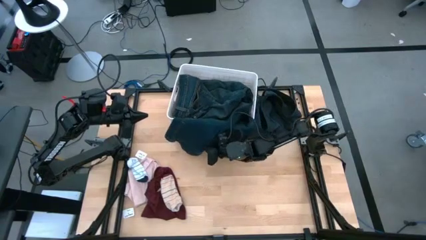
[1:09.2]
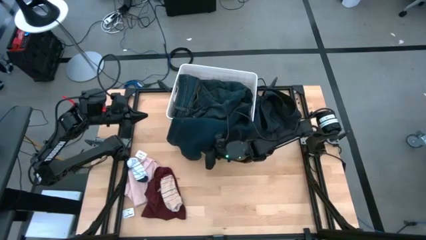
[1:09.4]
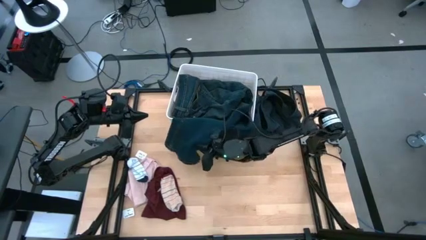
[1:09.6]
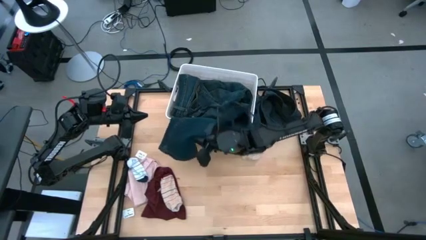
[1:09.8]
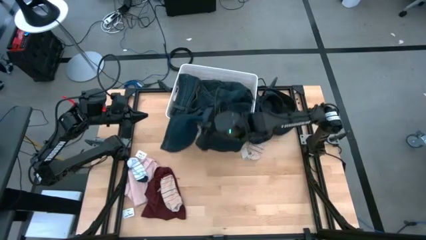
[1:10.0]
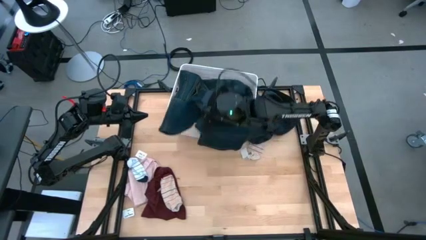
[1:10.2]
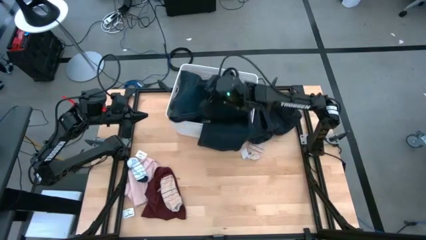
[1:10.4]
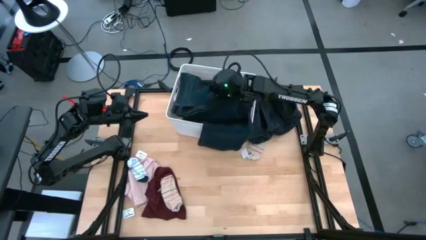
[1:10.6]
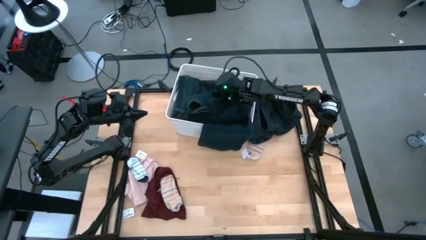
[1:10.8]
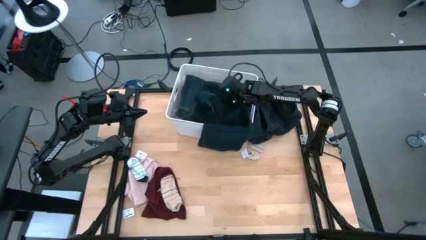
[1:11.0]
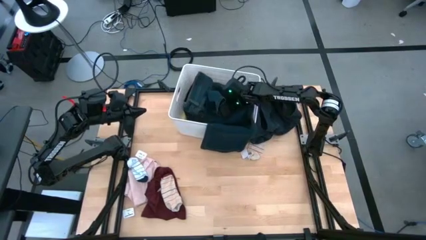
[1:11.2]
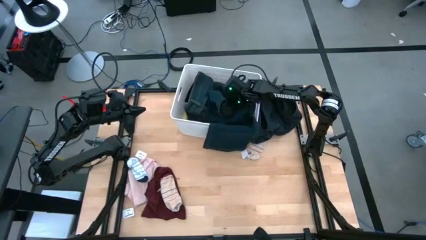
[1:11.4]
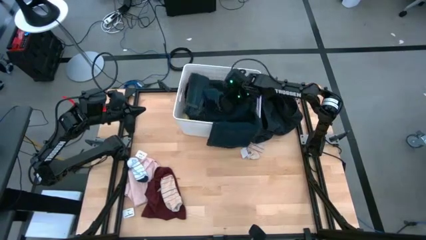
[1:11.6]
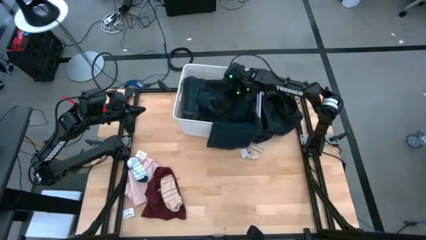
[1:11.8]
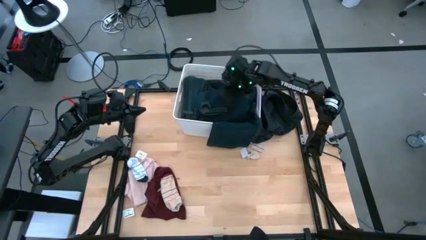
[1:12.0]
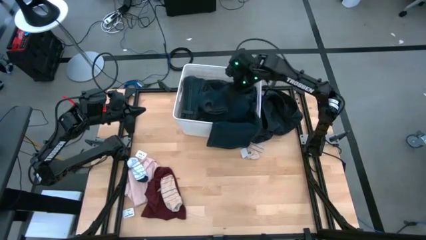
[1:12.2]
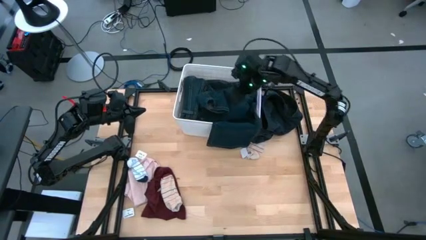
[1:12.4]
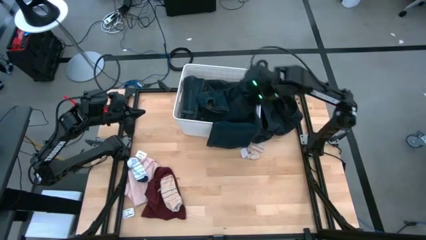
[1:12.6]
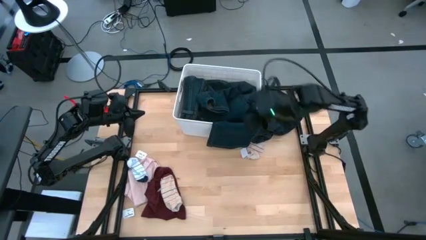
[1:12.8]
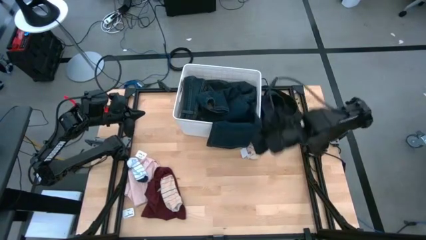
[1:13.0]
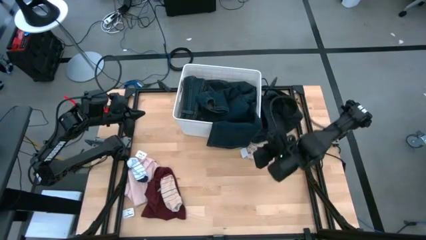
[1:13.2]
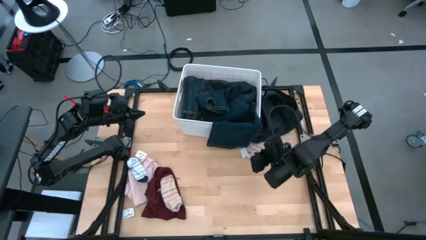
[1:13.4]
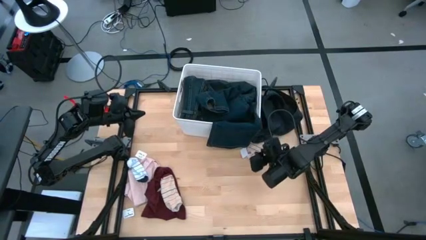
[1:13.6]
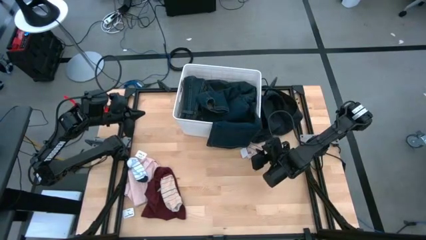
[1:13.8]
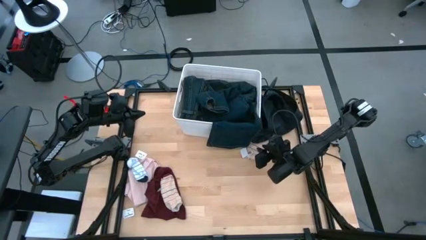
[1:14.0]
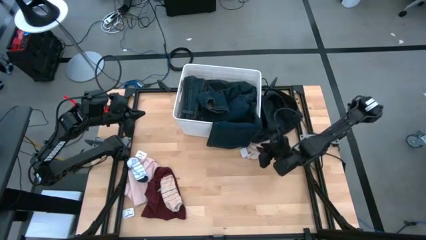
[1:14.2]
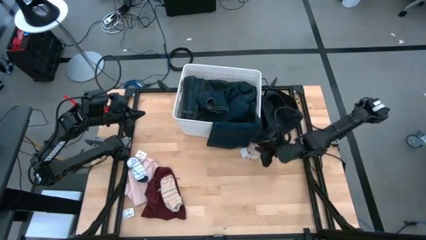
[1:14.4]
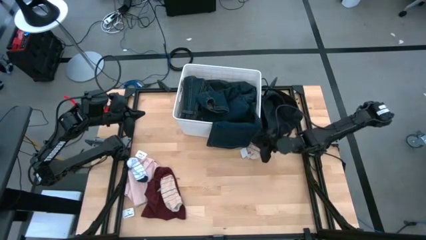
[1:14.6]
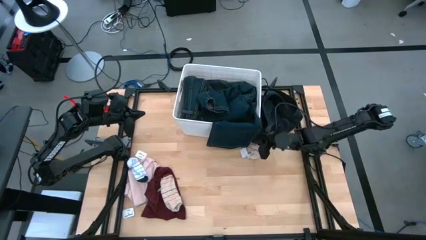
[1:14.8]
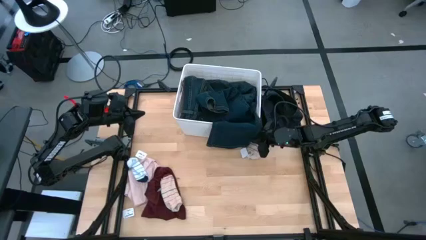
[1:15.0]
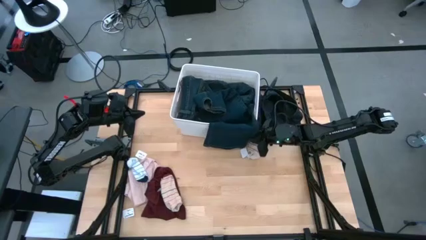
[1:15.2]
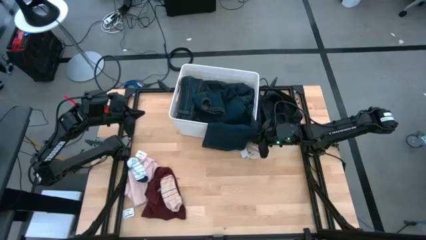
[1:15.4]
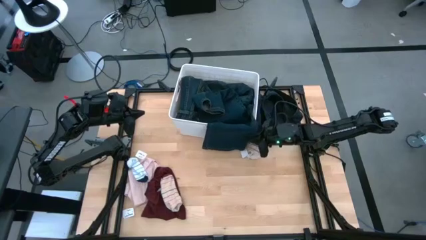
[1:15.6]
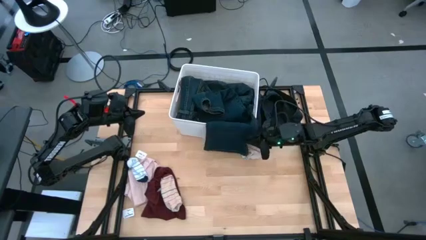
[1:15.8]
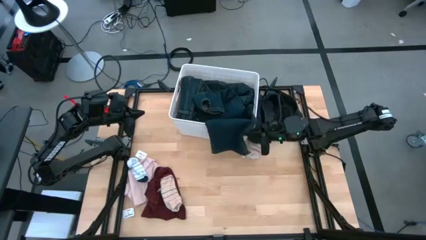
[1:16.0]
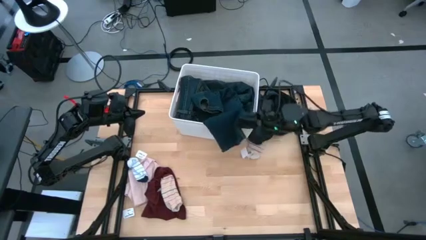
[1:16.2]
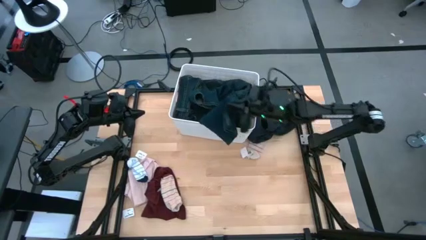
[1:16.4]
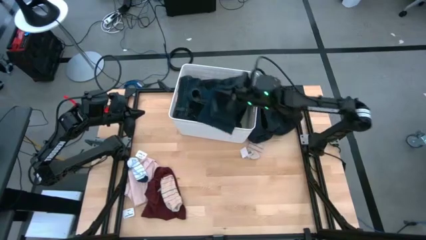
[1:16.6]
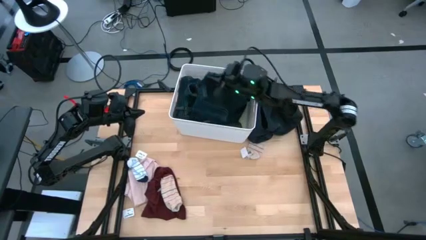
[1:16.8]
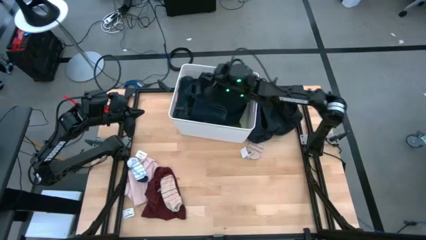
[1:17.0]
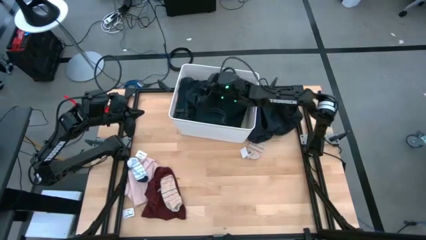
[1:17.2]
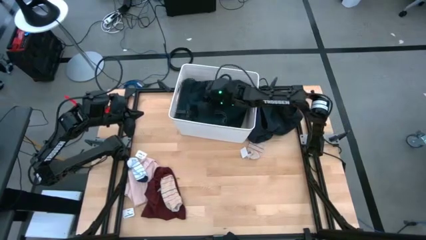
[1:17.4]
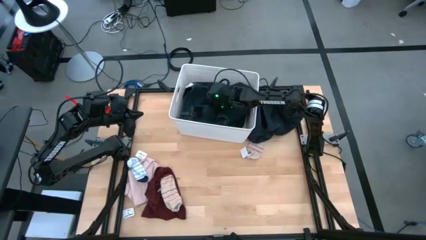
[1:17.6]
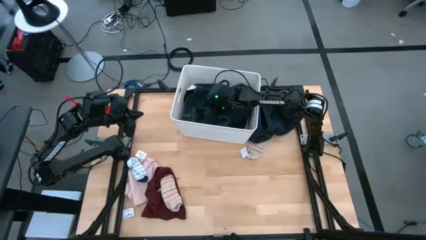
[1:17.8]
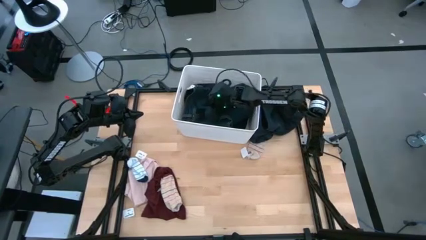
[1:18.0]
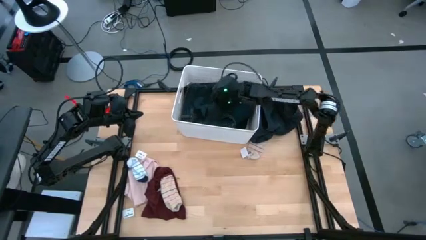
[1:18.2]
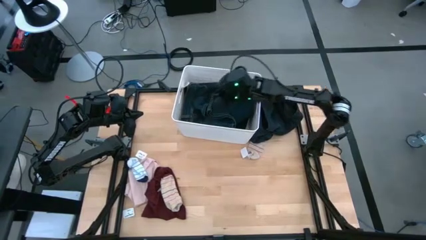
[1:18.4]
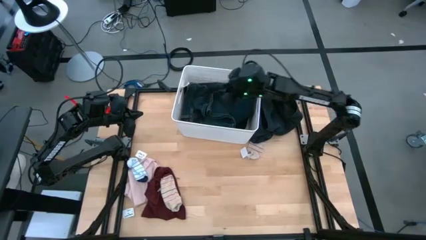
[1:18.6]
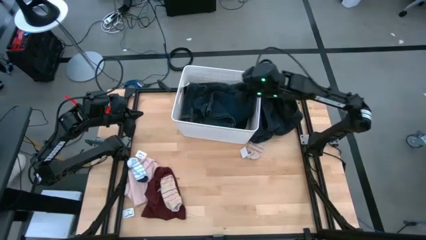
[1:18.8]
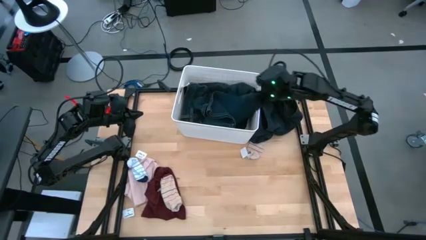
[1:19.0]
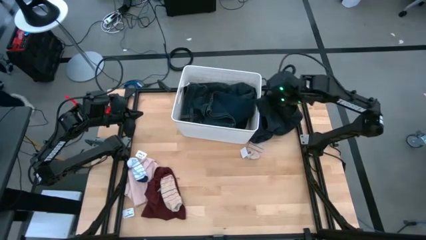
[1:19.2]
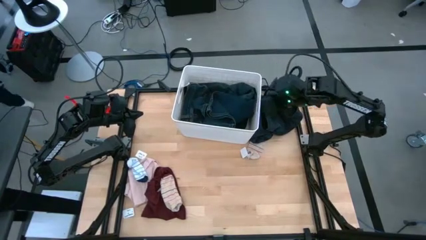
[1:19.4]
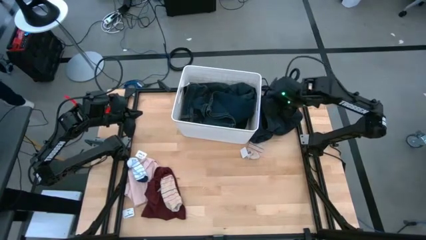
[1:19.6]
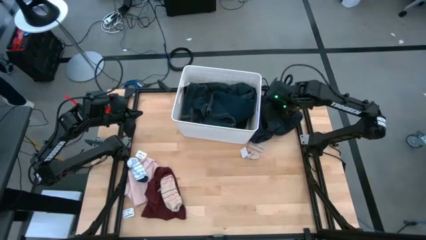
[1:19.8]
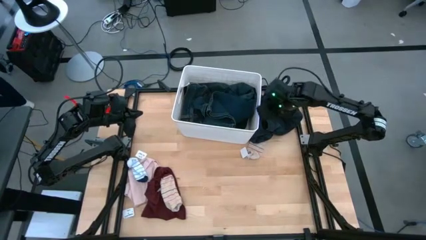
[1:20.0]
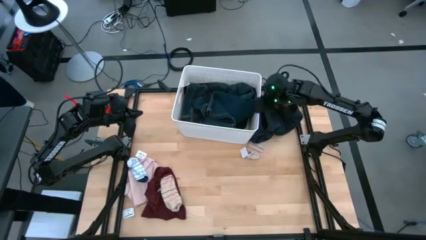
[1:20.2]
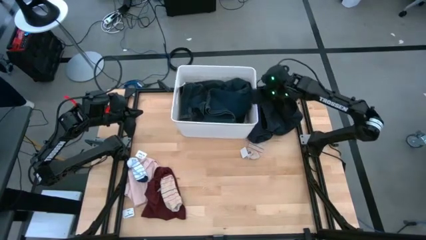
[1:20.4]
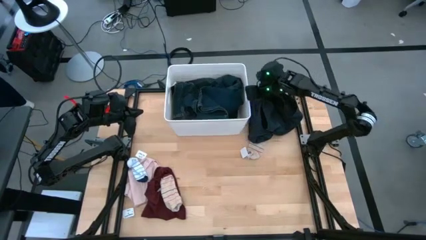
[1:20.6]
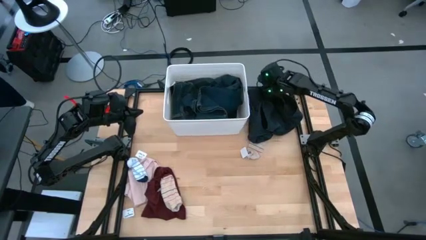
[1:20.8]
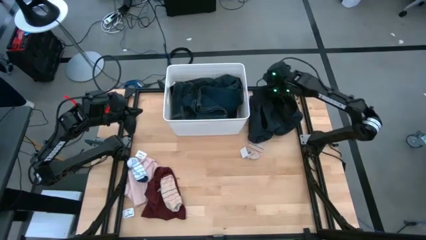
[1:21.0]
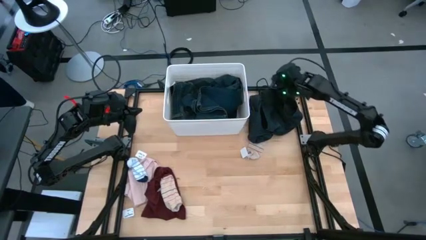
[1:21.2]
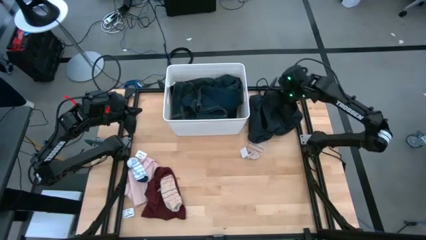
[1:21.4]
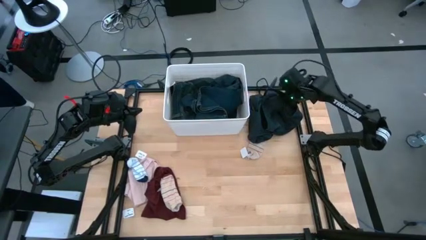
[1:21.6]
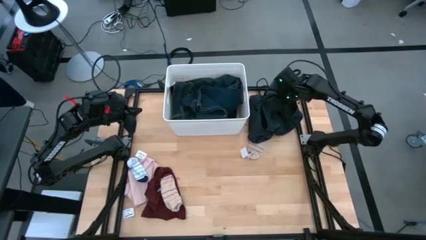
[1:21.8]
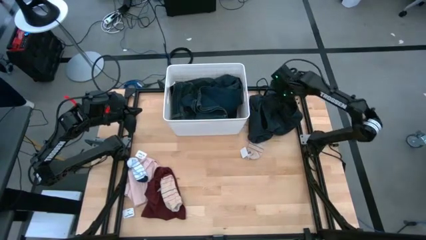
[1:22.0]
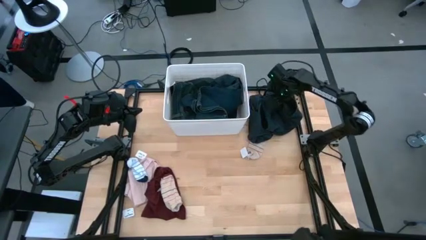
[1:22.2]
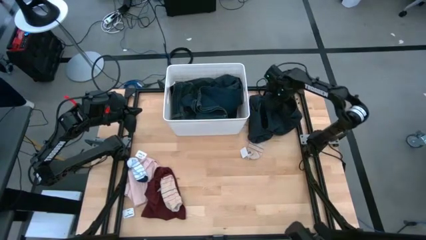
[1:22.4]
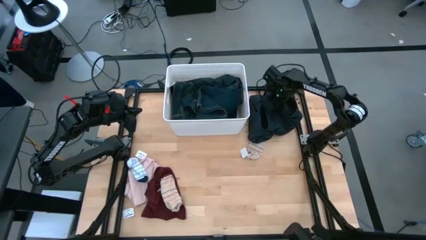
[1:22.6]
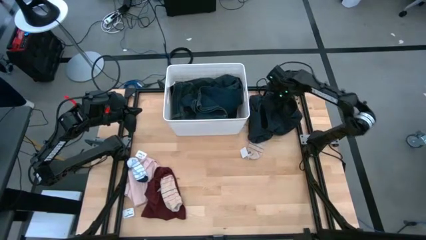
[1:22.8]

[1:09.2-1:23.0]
Task: Sort clothes
Put the dark blue pants into the white laundry bin

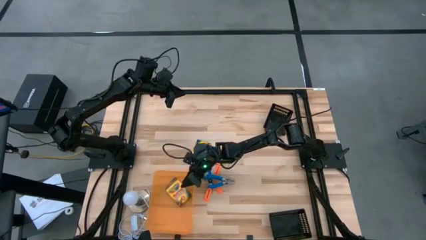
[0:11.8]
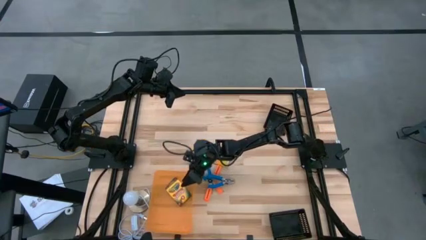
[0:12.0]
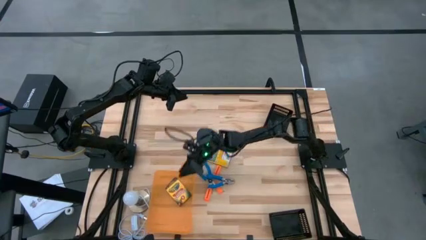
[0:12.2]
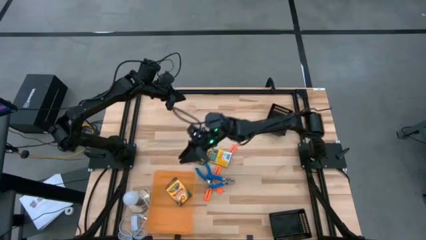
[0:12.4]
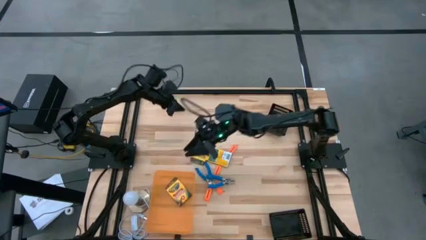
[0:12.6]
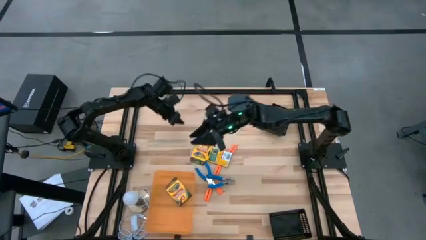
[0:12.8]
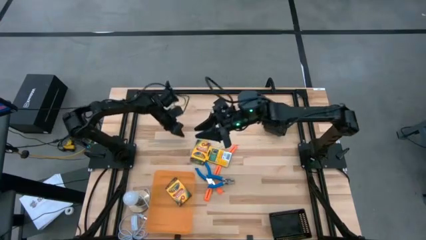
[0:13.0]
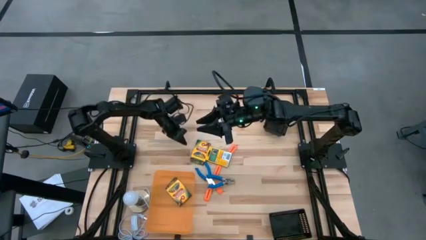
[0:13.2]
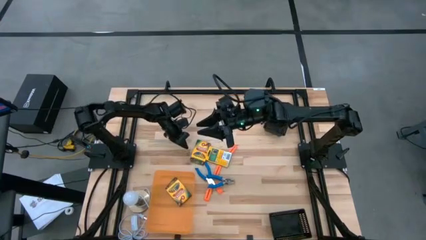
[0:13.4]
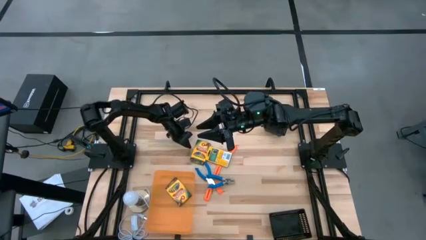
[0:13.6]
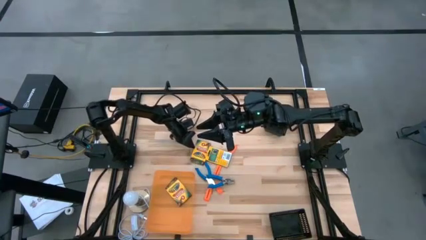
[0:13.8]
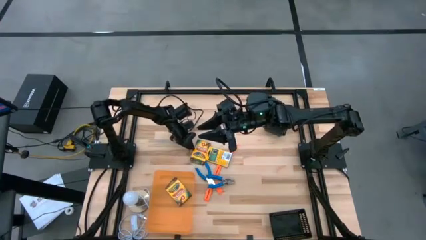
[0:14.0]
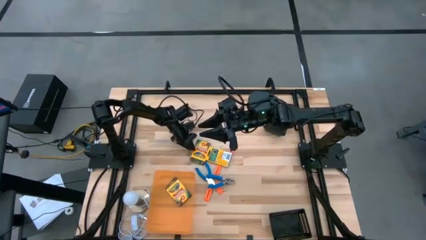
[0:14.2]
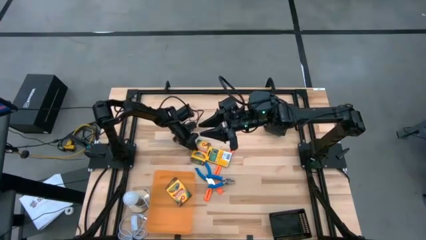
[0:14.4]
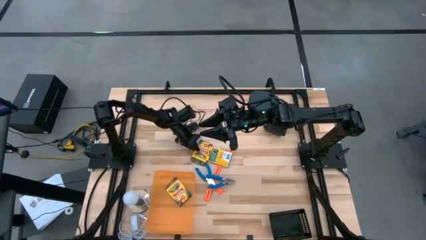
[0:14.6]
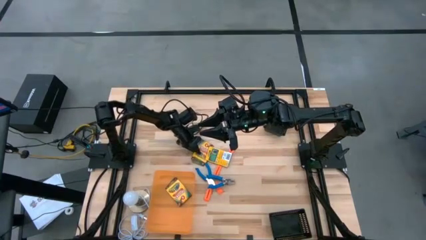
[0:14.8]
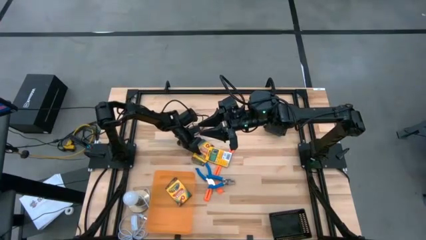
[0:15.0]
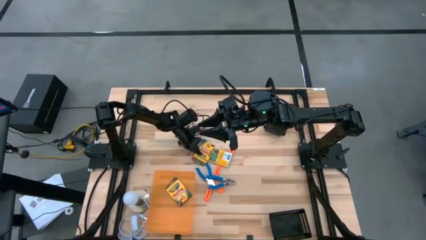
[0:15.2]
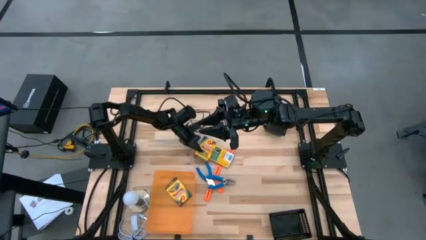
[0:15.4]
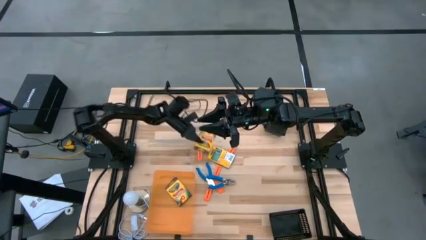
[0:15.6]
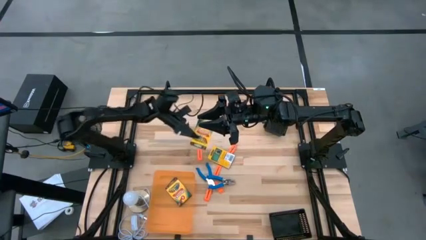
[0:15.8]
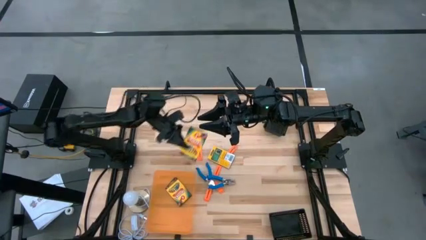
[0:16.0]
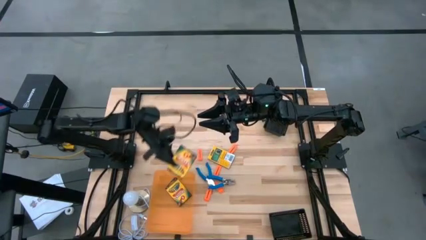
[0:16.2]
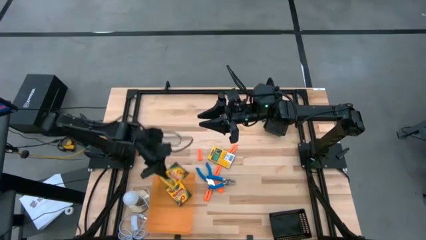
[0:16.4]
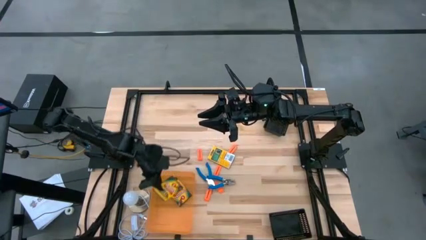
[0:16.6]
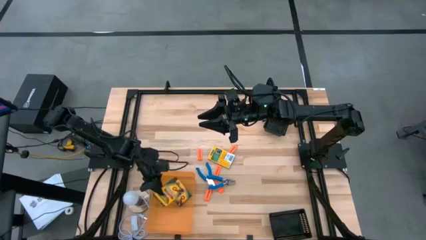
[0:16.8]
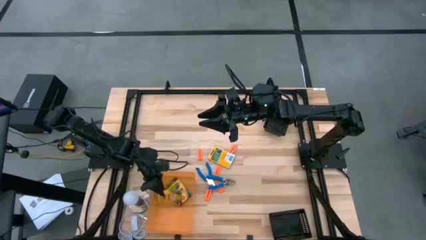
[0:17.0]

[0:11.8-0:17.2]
Task: Pick & Place School Supplies
Put the left yellow crayon box into the orange bin
